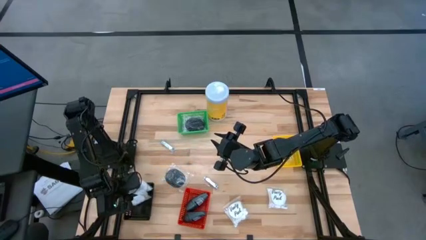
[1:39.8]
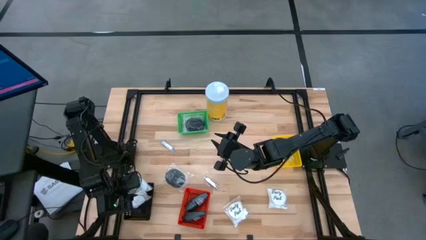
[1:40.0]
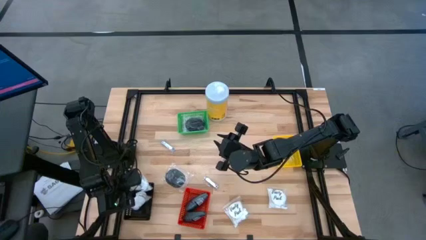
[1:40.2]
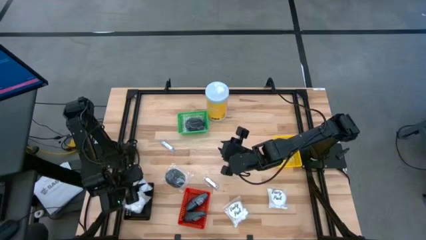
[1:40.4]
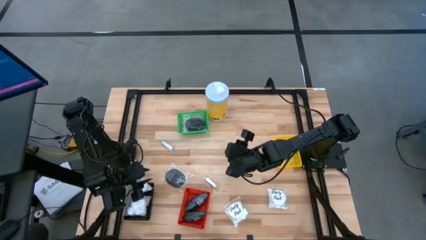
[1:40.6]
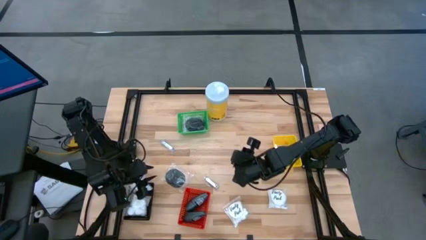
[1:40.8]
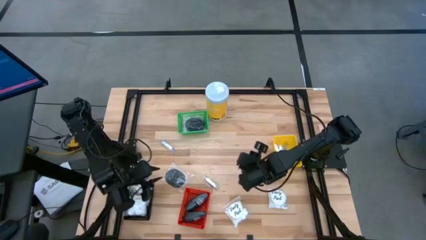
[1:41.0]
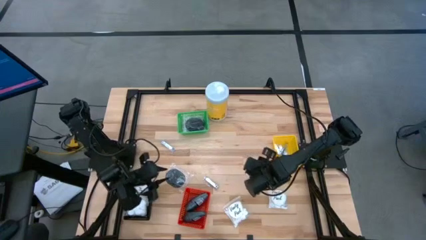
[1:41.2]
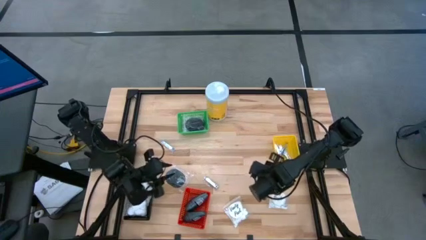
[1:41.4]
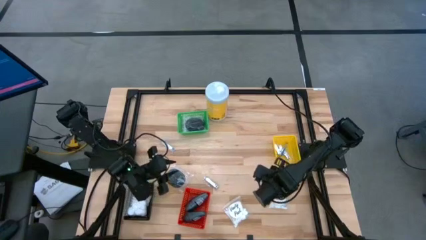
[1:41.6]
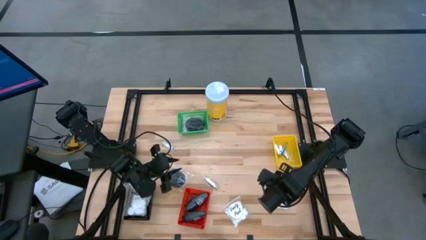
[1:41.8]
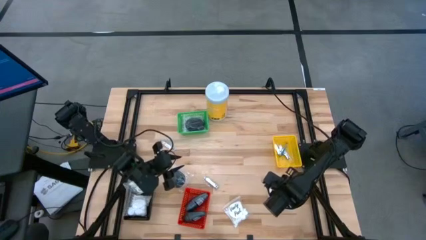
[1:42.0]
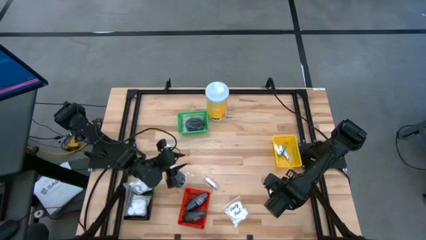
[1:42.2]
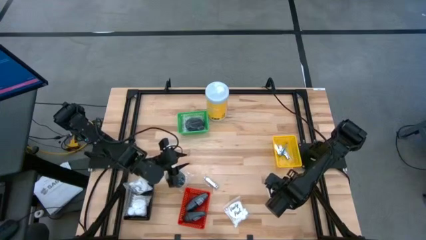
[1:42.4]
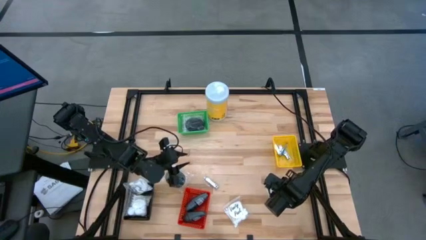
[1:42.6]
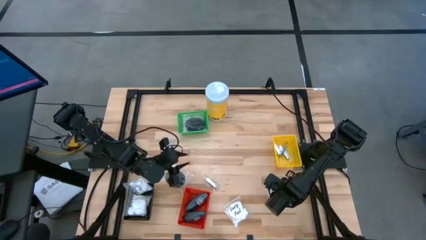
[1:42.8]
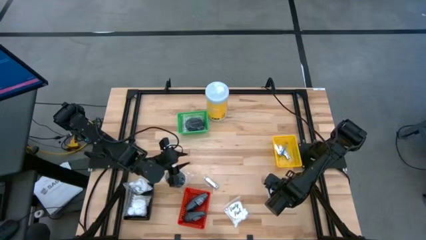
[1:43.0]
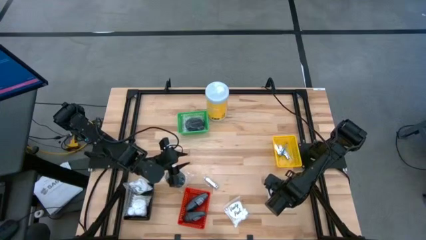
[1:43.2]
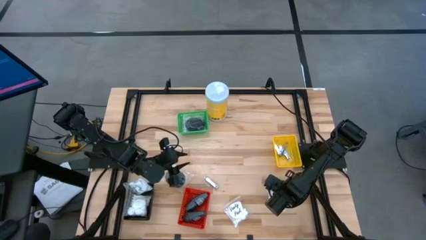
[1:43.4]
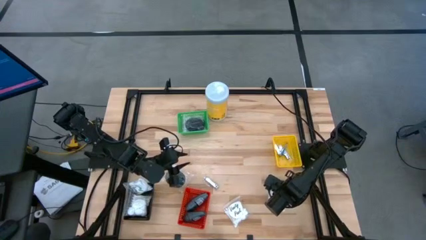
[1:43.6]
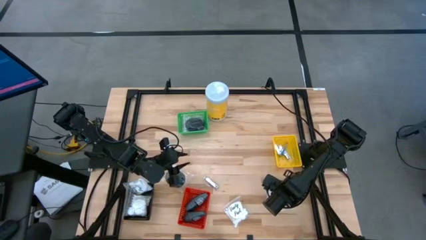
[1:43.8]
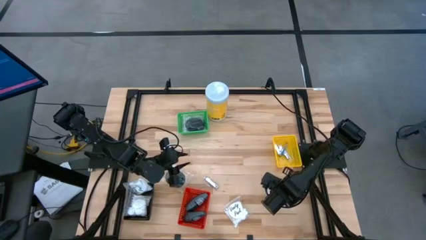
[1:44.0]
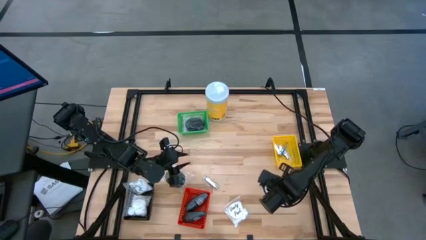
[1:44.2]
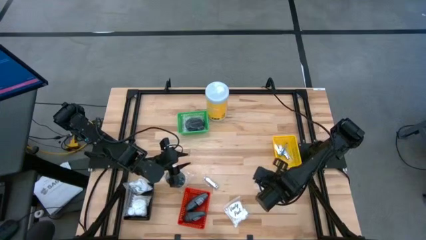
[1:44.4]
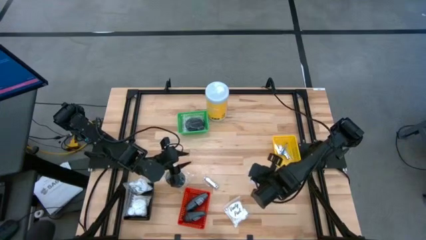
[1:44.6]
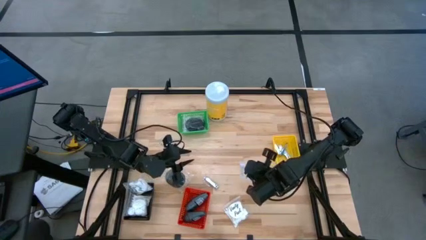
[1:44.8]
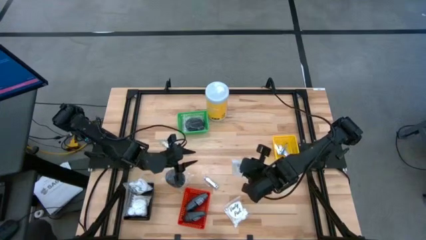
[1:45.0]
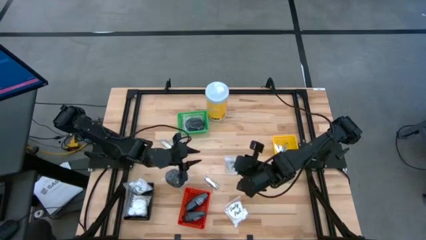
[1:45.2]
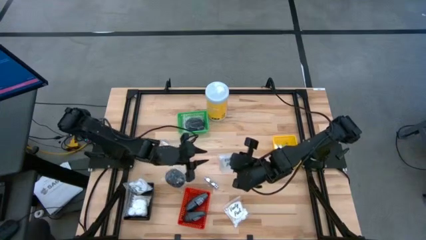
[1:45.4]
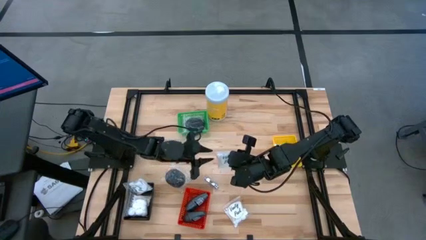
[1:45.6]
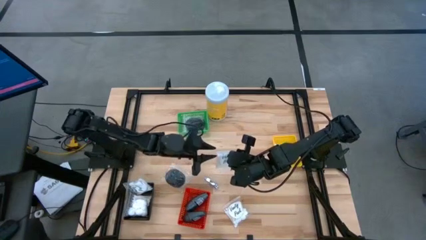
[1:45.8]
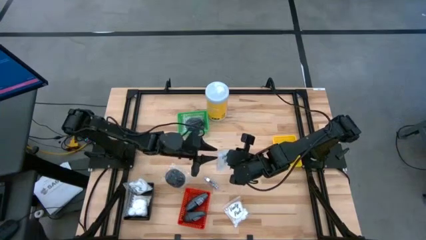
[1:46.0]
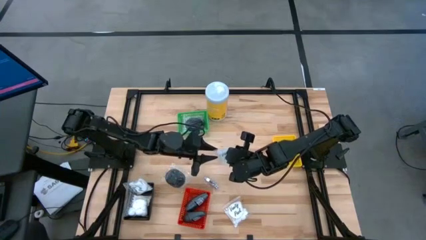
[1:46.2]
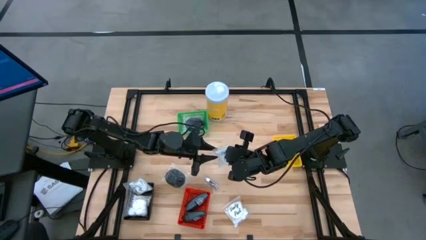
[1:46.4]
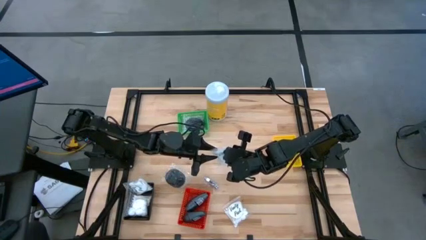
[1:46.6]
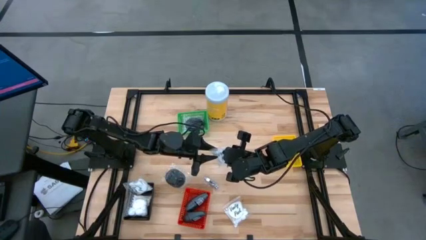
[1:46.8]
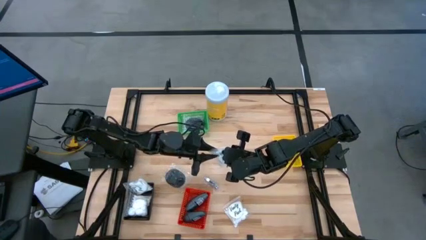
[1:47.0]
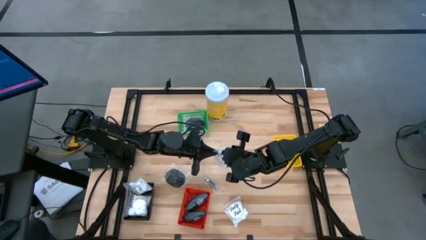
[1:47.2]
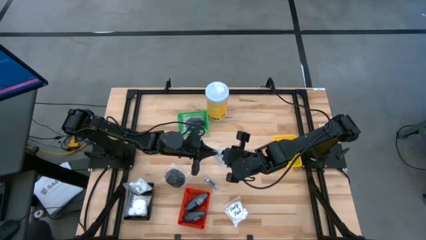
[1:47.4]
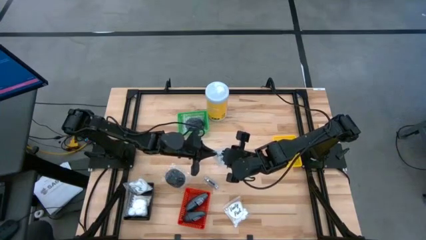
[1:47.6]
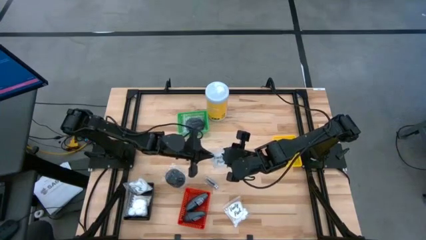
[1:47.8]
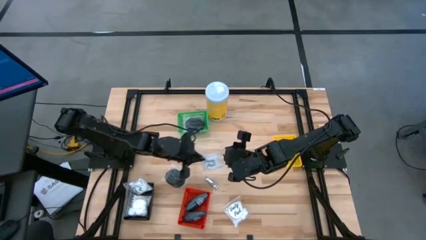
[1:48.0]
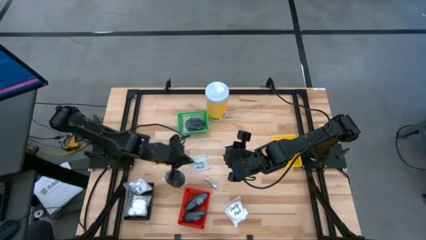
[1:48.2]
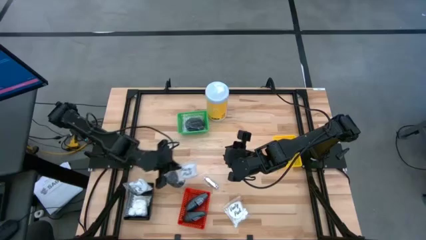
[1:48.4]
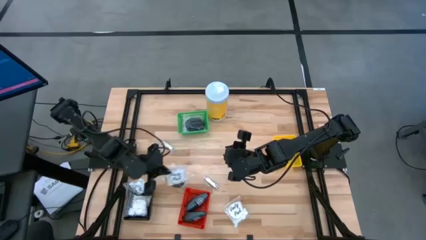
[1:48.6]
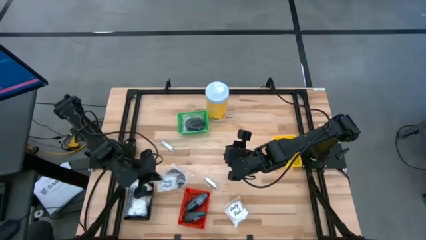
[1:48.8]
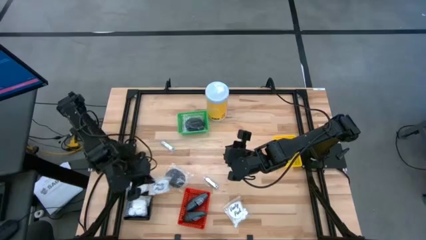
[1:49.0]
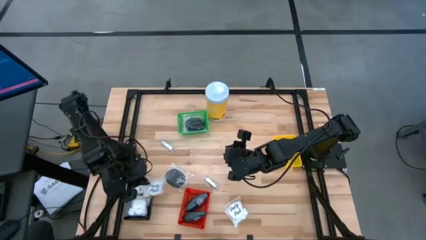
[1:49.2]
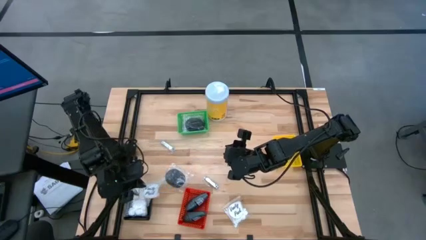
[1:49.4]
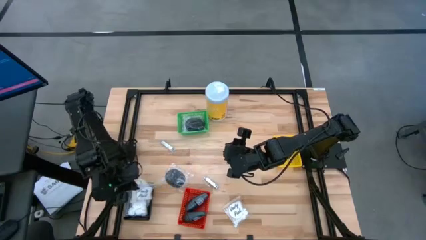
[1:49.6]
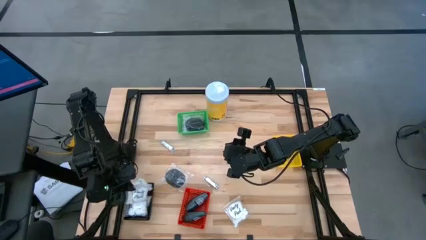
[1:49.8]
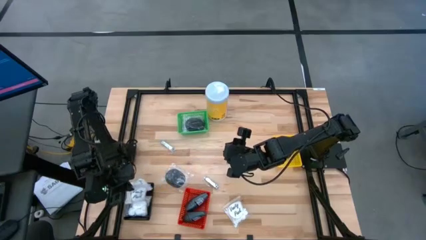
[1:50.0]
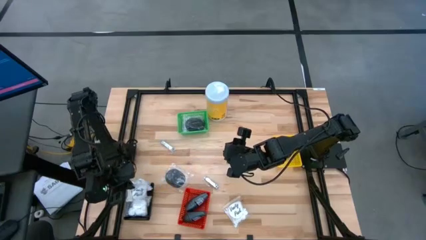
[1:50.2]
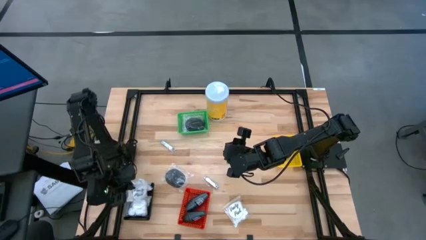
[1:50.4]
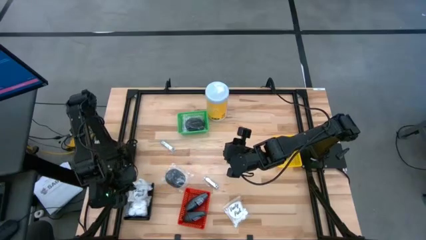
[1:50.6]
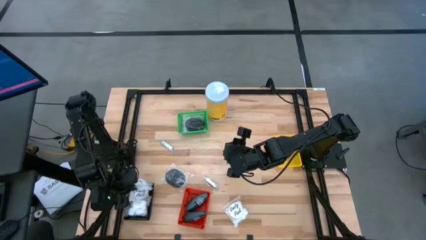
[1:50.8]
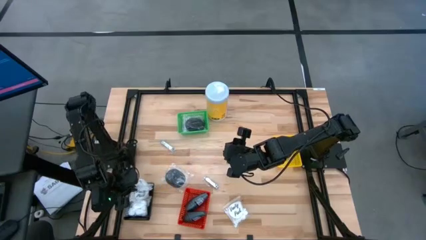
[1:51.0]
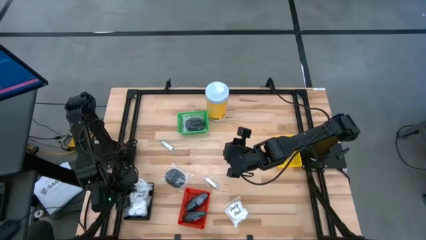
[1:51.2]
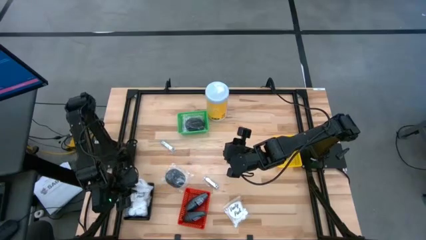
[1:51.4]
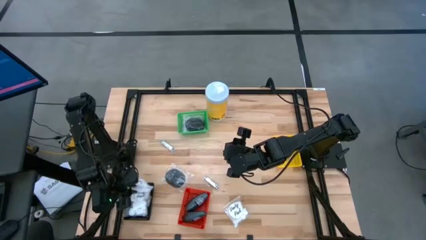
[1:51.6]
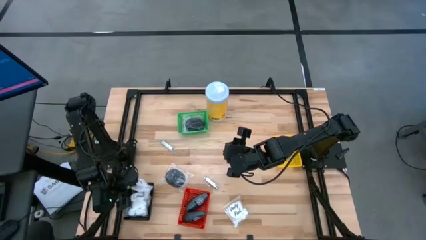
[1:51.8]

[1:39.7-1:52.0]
Task: Pick & Place Travel size toiletries
Put the white cotton pack into the black bin

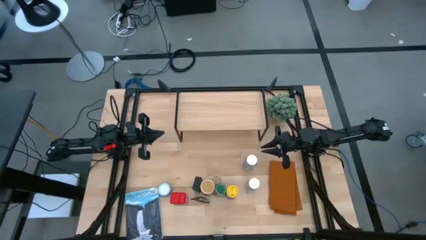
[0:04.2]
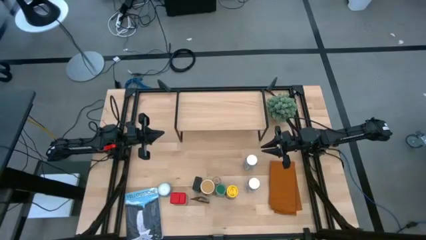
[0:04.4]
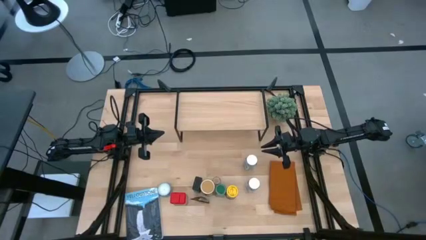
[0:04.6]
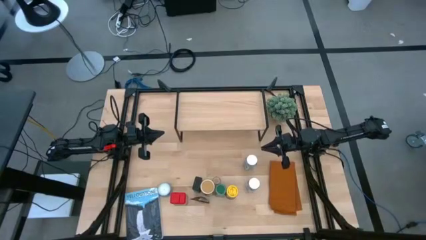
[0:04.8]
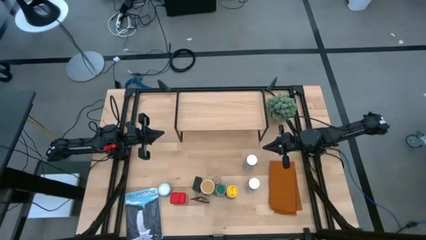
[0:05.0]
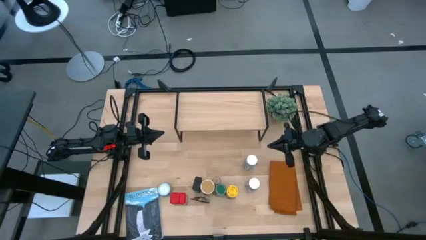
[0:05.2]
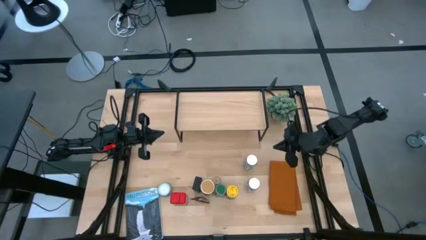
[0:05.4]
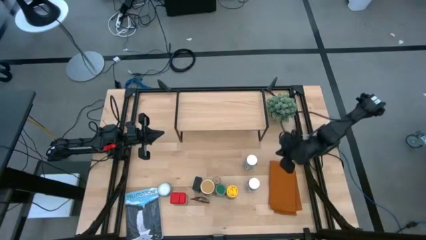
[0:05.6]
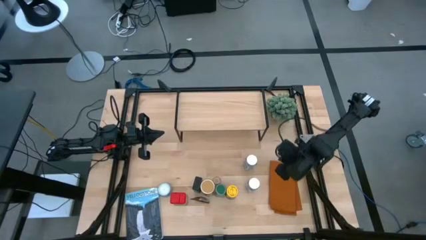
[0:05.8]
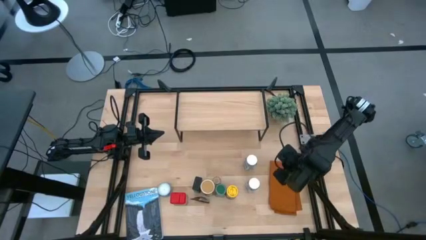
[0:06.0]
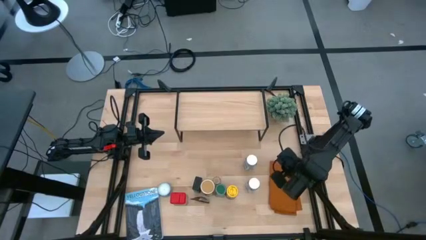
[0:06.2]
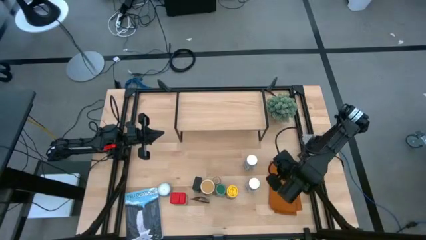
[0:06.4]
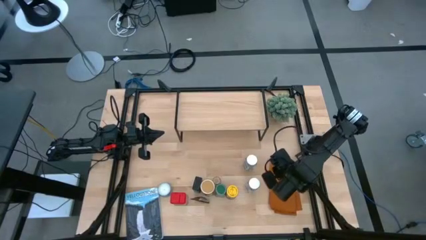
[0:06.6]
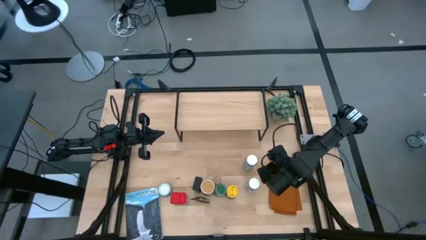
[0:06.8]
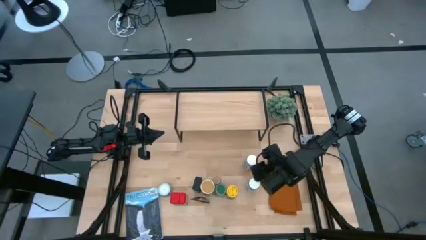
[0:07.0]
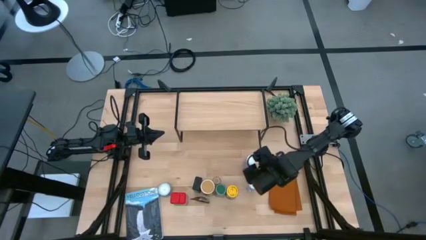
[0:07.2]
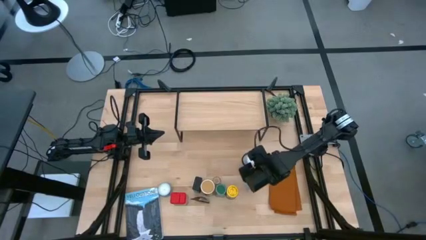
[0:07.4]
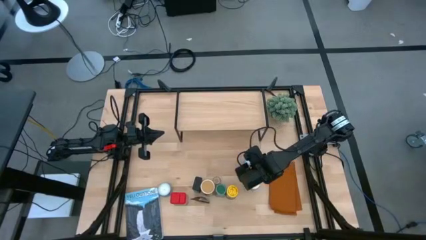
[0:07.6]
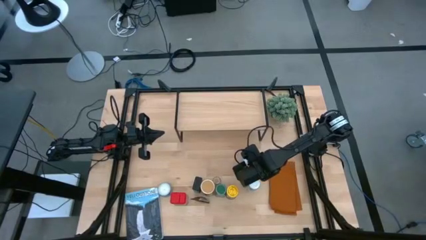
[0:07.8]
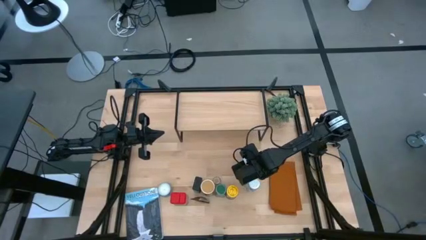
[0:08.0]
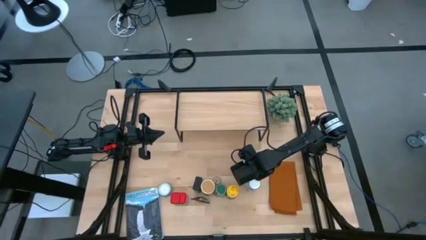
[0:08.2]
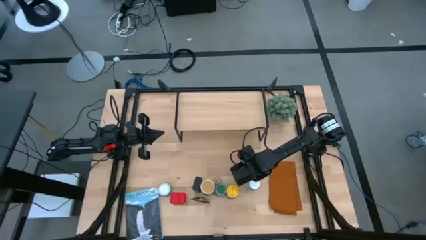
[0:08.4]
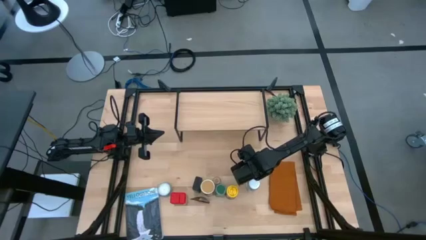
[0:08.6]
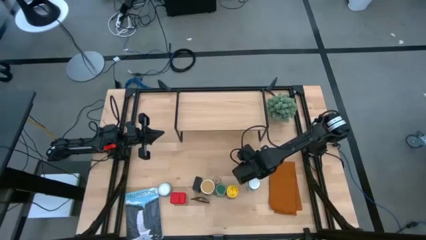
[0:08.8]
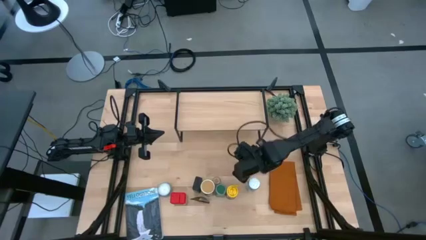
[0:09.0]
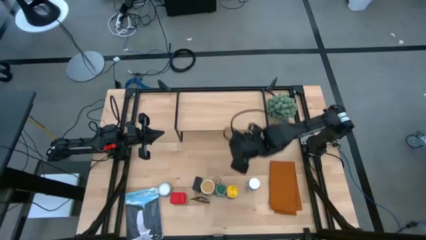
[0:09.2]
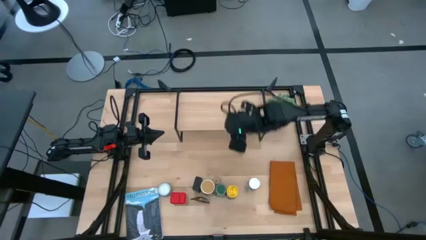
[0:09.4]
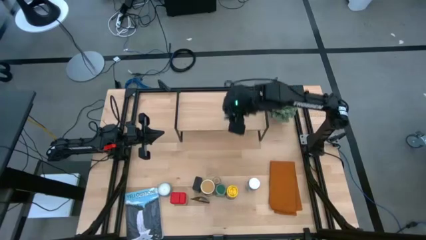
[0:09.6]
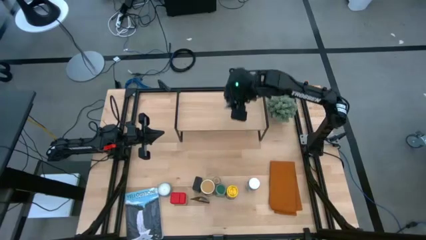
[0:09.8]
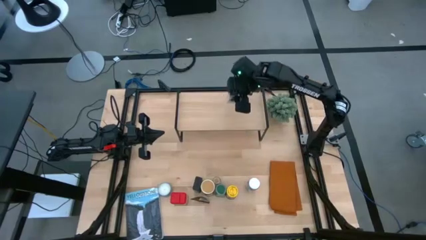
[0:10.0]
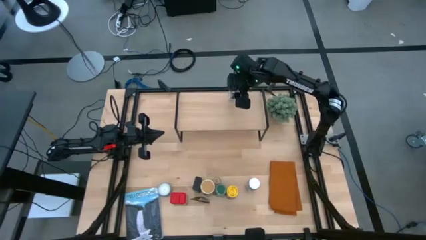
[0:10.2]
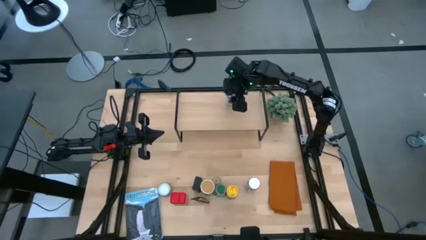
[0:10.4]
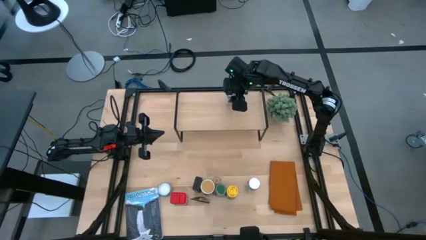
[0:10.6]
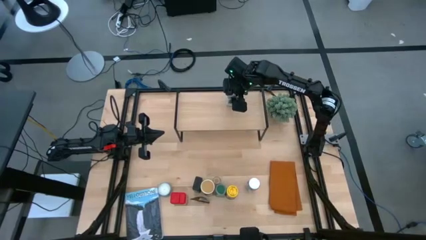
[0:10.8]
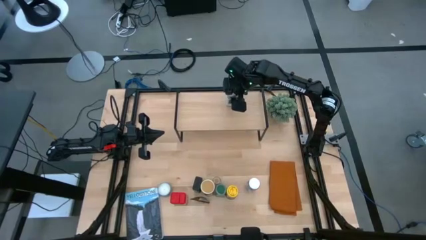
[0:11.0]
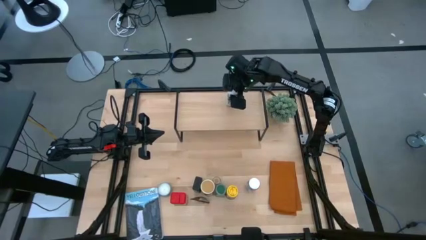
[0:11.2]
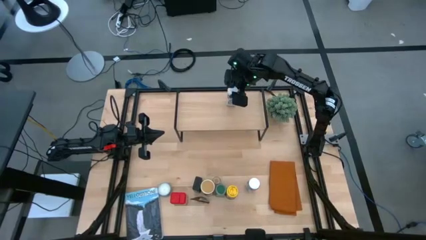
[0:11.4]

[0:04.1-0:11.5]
Task: Shelf spices
Put the top white seasoning bottle on the shelf
